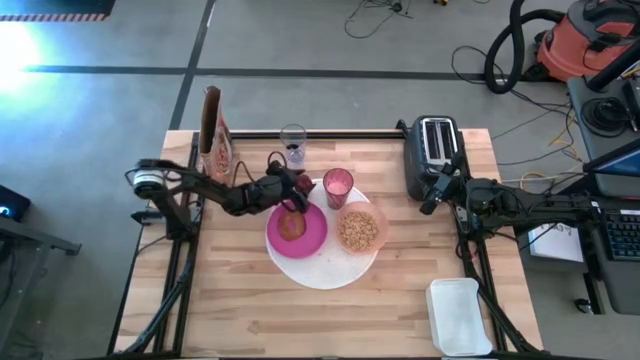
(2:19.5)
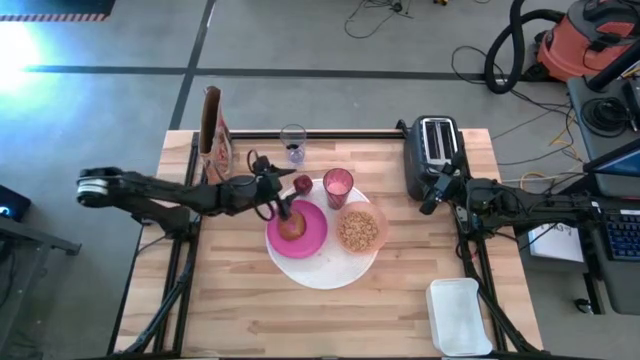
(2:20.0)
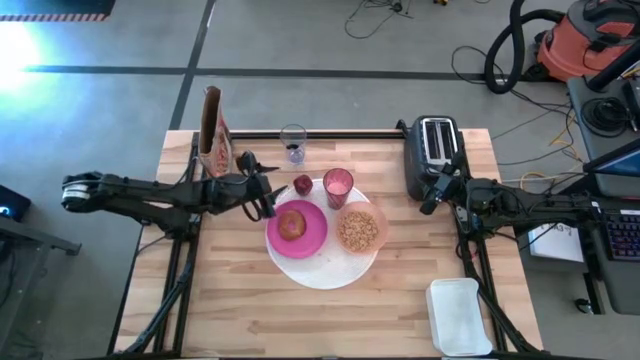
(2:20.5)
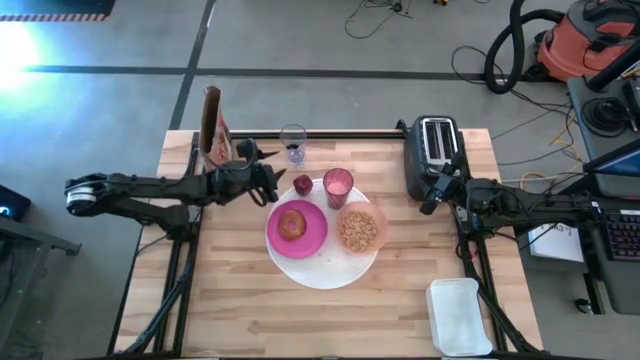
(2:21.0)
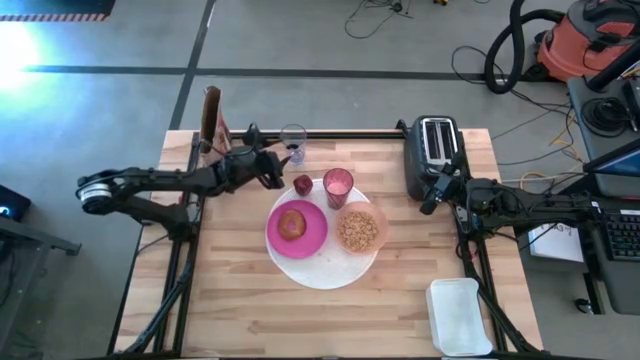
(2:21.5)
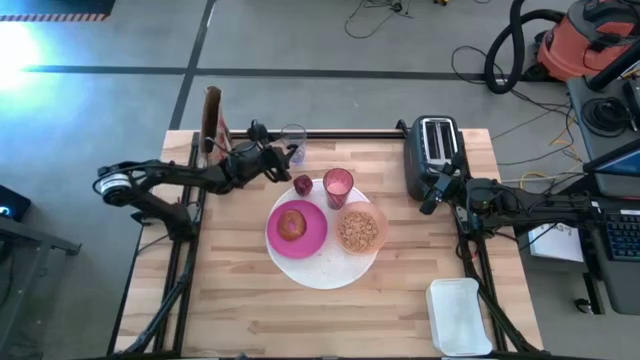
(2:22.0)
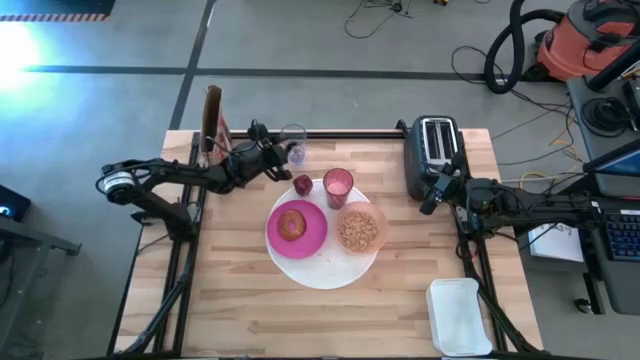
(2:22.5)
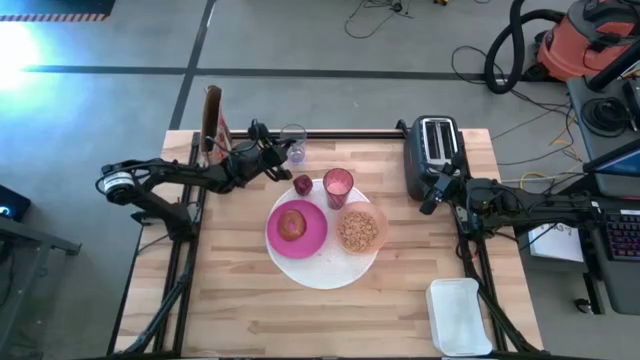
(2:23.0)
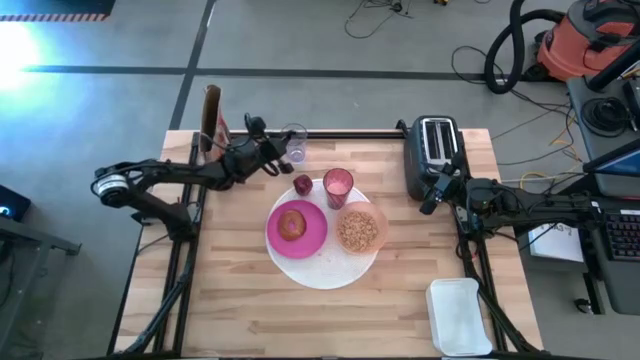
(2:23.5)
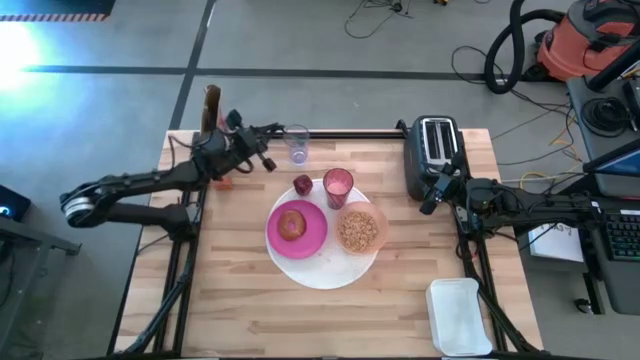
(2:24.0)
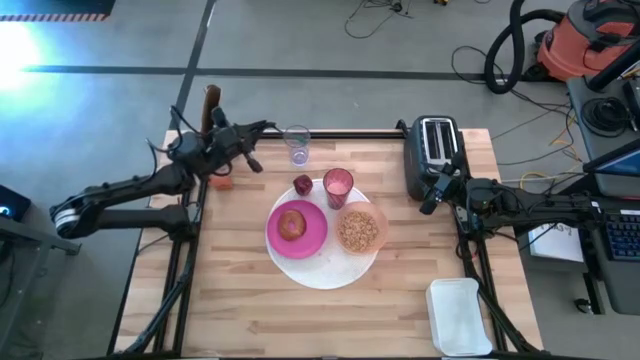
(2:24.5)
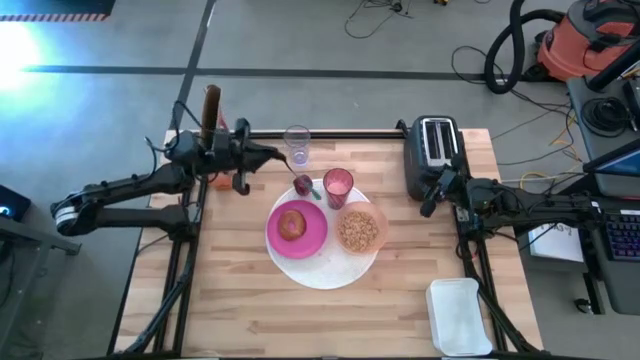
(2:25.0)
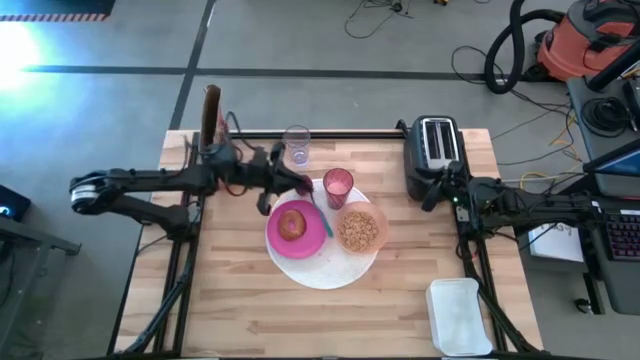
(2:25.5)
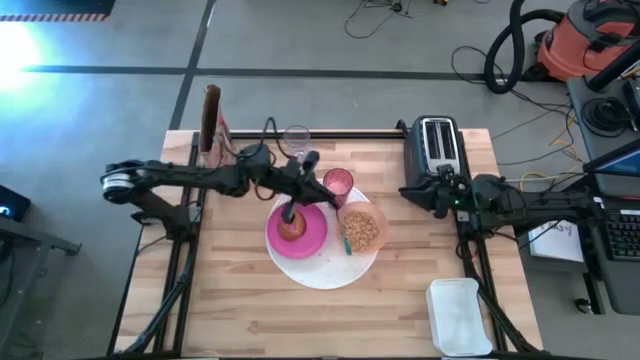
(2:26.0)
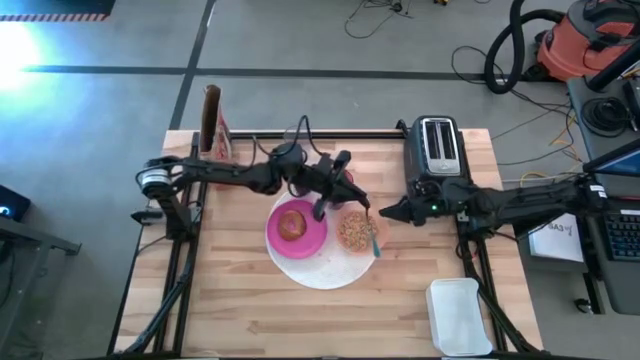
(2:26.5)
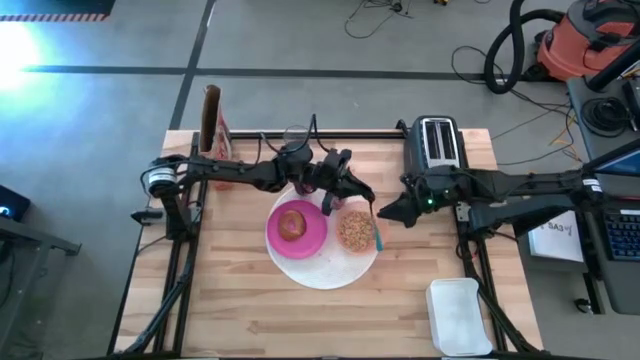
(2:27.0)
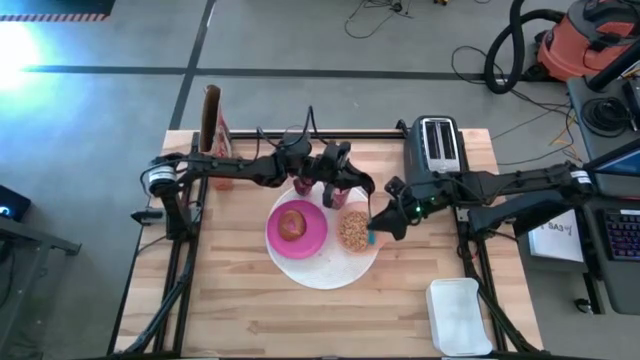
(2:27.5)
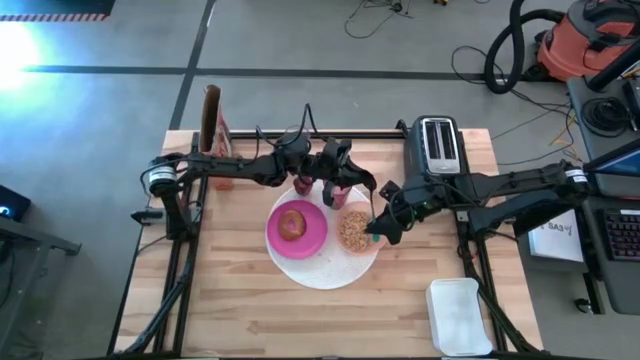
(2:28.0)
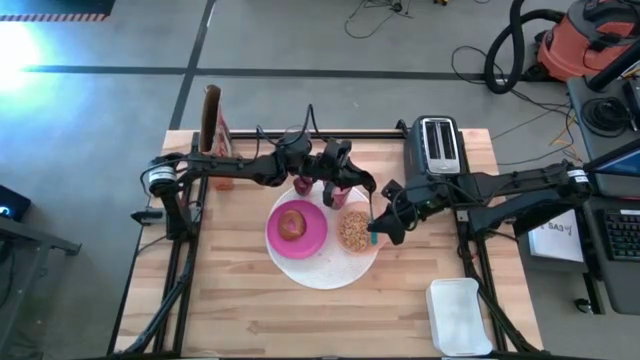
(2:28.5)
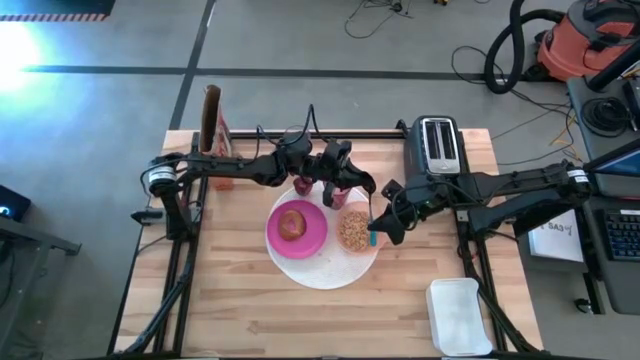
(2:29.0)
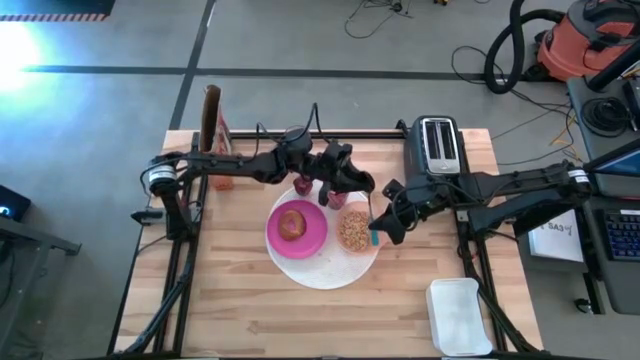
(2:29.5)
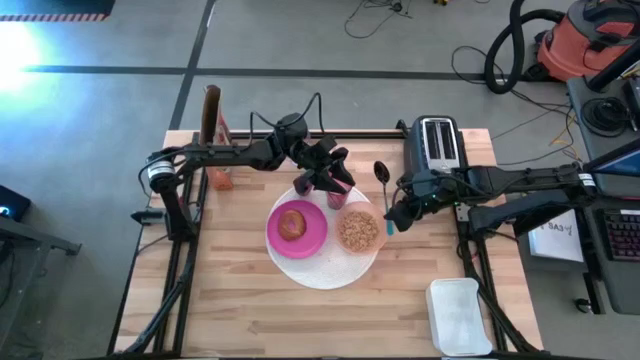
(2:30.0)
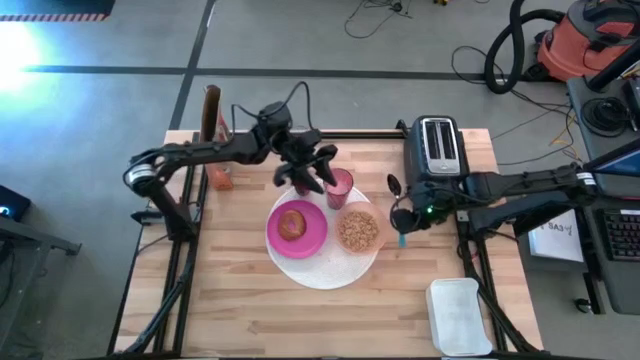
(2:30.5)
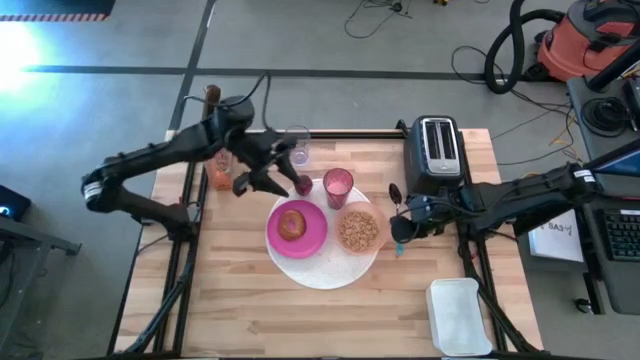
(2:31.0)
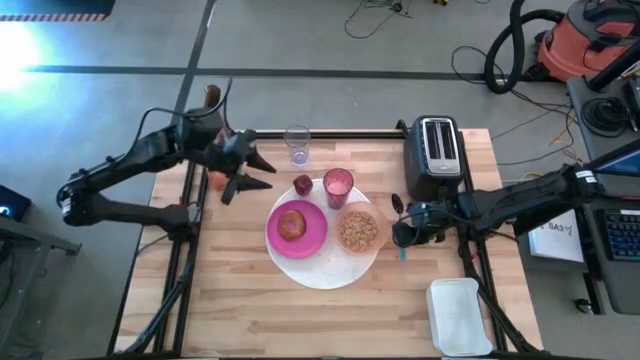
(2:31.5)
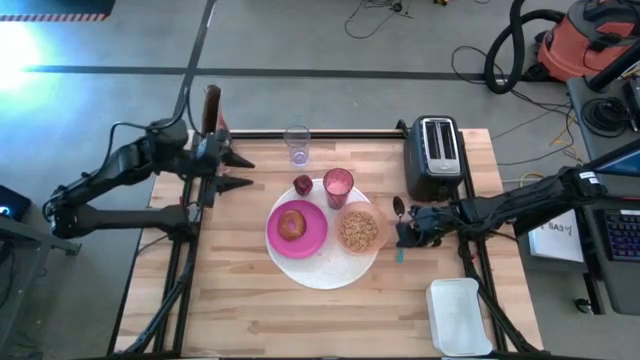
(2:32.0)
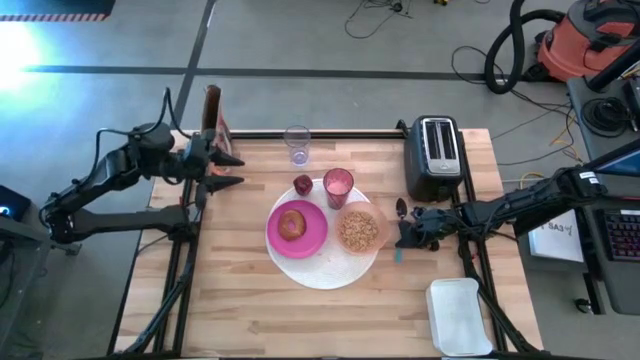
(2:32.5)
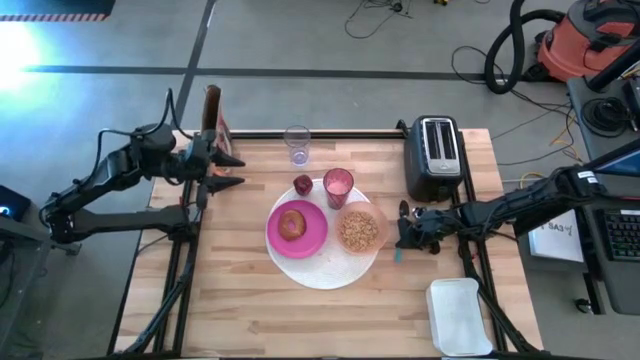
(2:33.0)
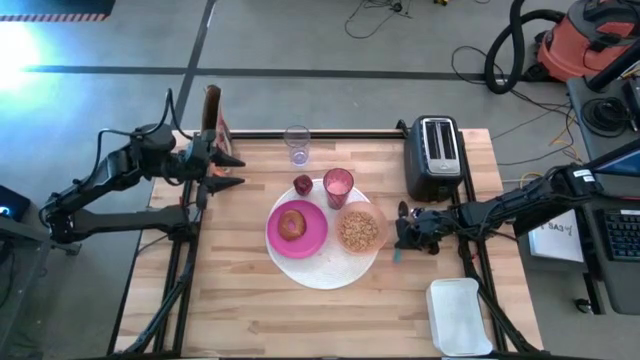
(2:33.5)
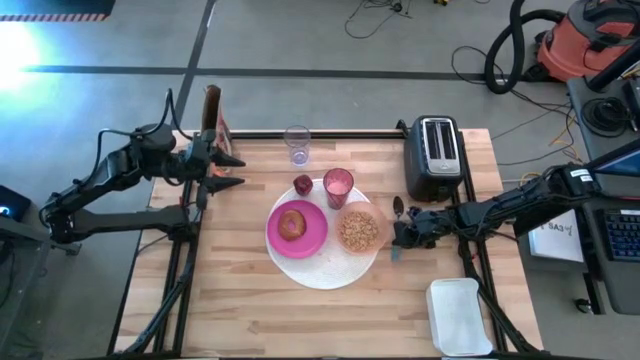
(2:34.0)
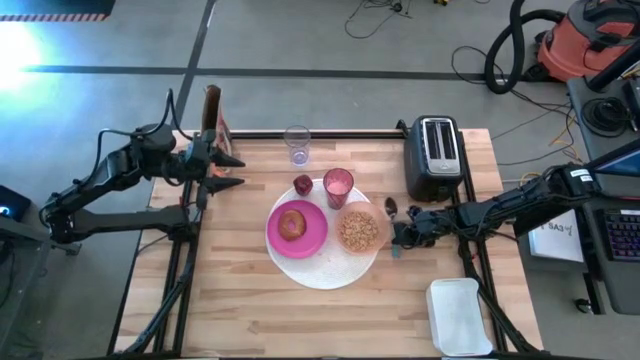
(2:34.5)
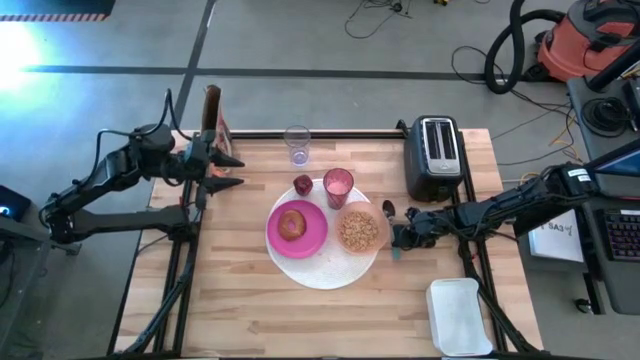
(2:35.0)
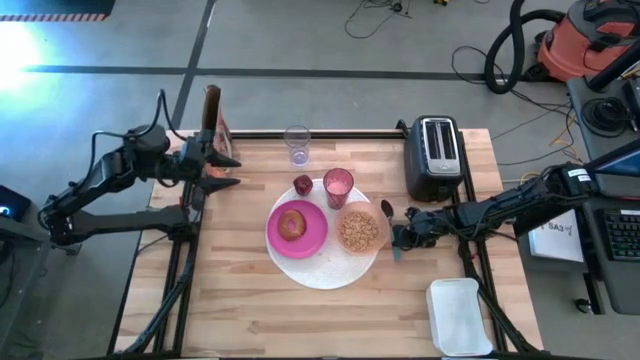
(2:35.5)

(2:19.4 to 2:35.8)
Task: Arrange a breakfast setting
Put the spoon to the right of the orange bowl

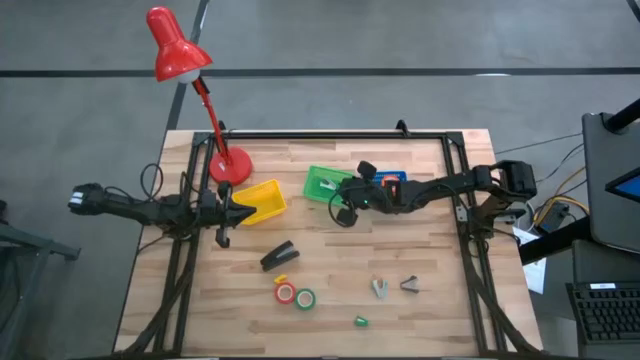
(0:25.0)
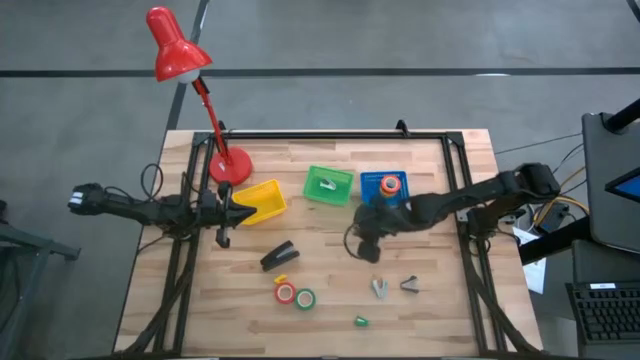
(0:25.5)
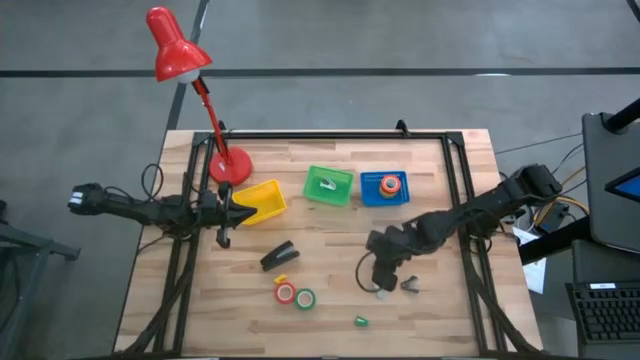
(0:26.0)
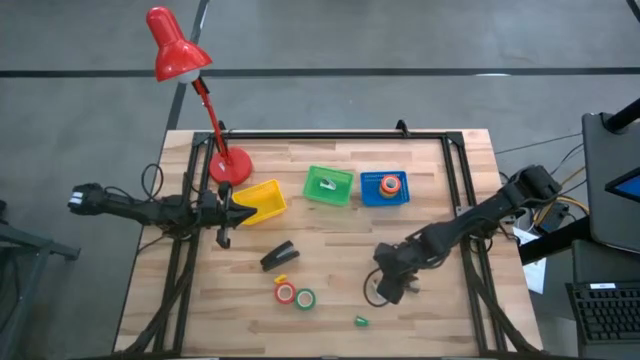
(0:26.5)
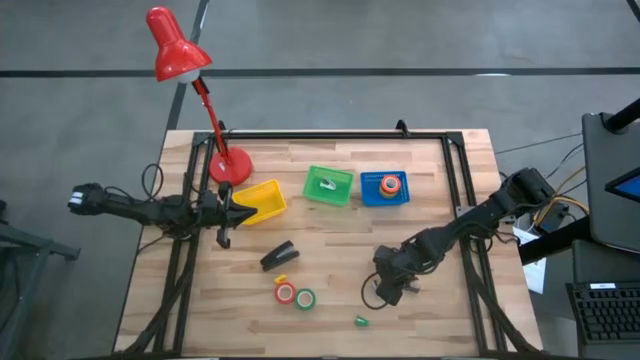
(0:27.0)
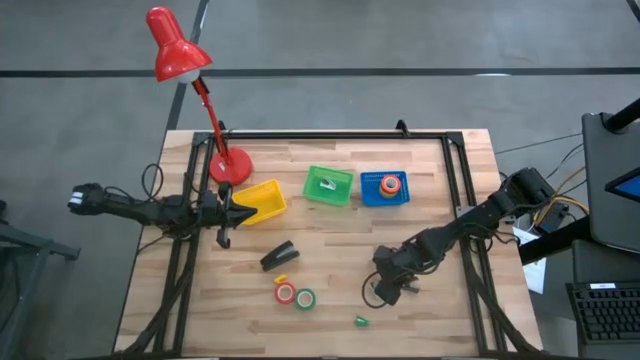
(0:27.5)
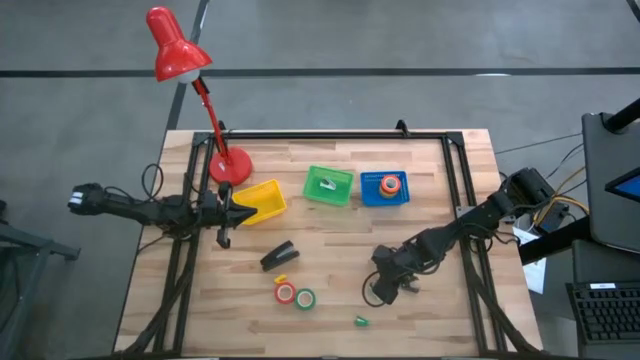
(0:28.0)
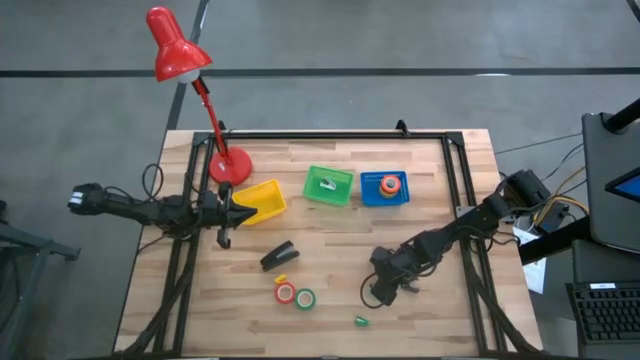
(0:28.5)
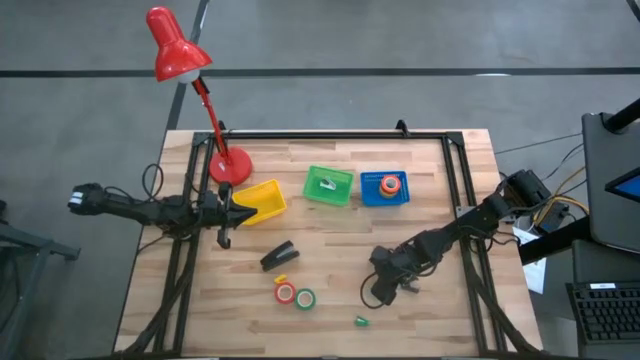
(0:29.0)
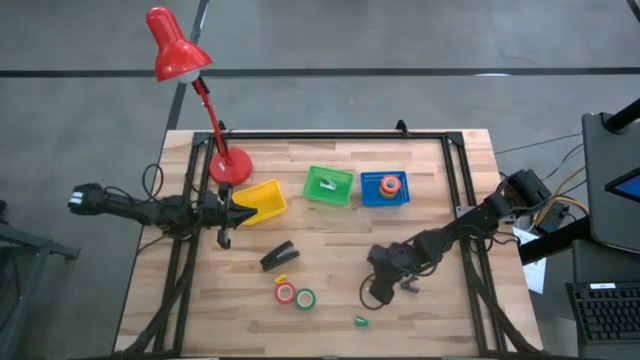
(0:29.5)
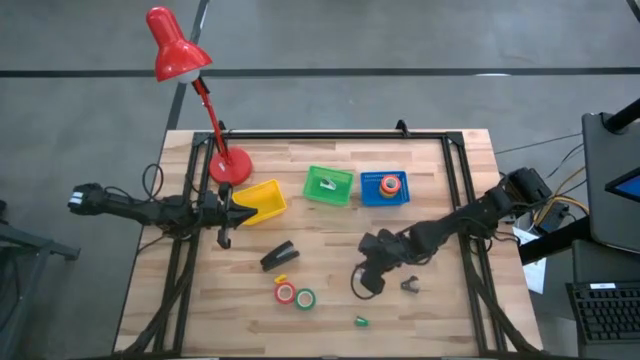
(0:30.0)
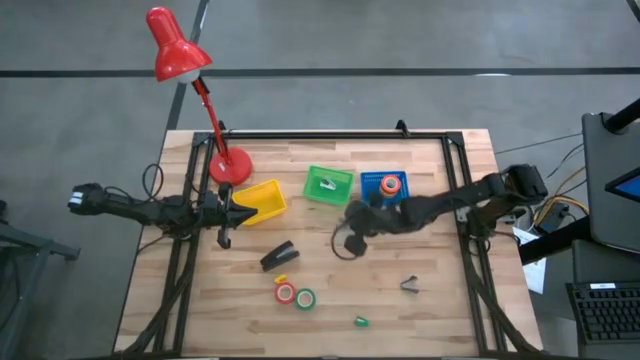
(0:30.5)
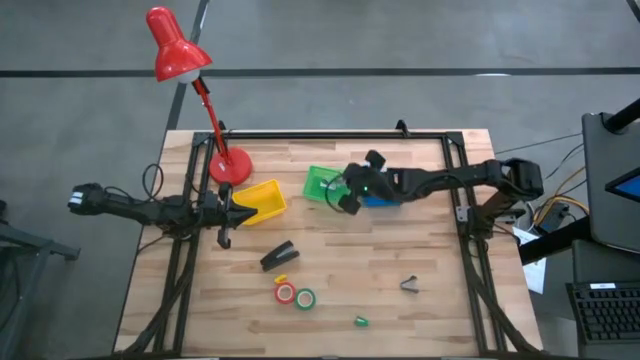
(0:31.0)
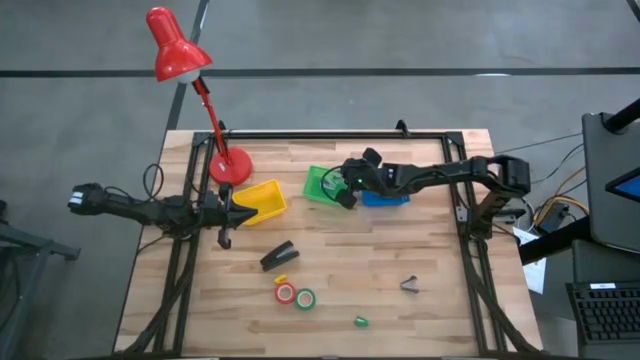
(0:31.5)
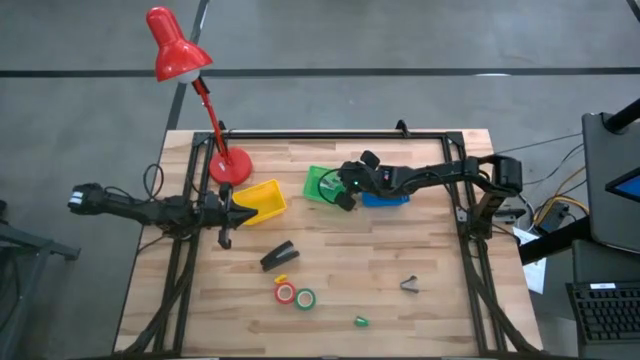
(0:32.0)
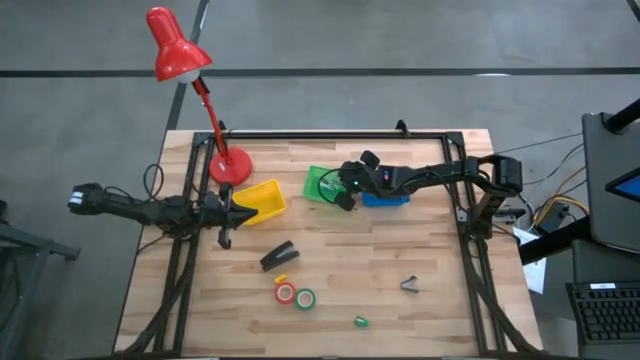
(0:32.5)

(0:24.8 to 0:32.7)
Task: Pick and place Stapler, Stapler remover, tape
Put the light blue staple remover in the green basket
